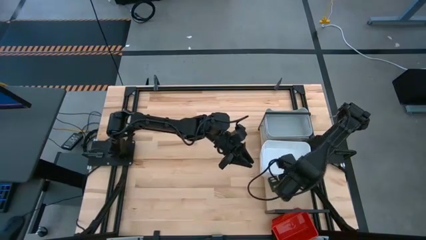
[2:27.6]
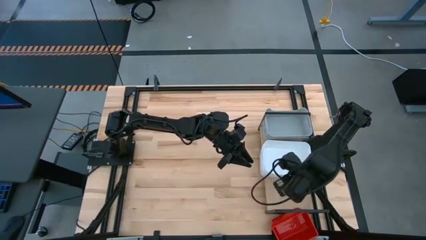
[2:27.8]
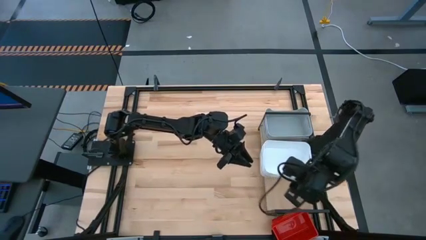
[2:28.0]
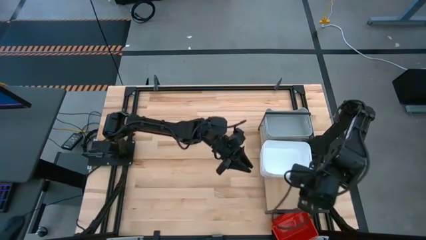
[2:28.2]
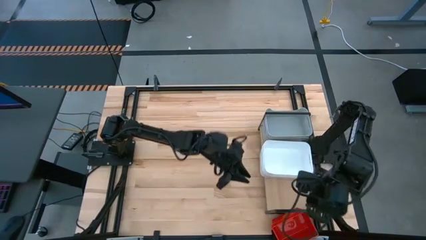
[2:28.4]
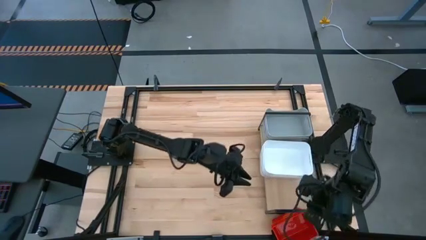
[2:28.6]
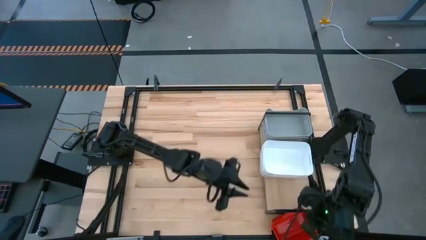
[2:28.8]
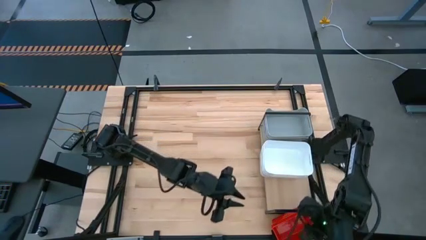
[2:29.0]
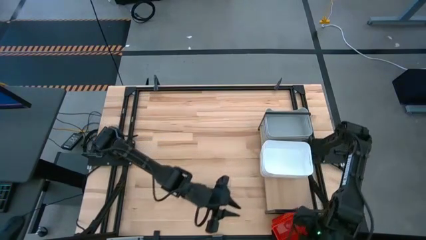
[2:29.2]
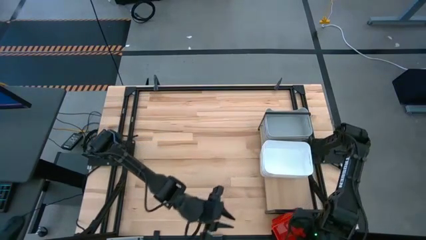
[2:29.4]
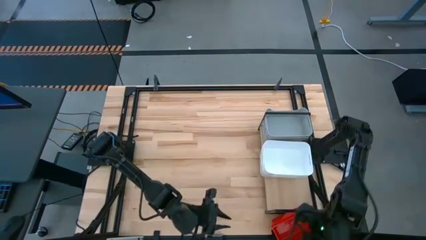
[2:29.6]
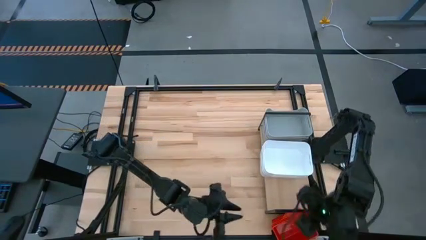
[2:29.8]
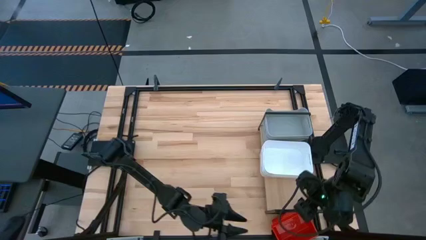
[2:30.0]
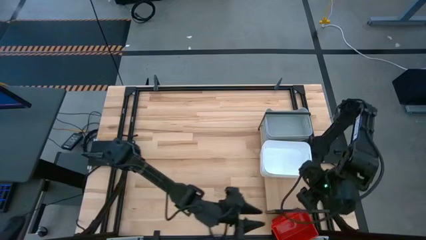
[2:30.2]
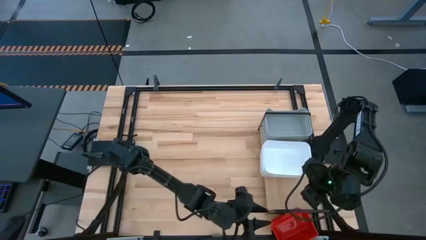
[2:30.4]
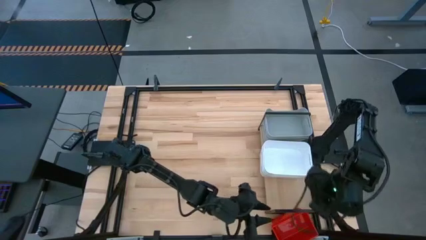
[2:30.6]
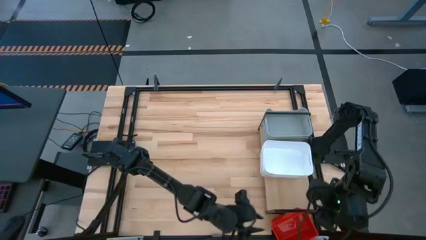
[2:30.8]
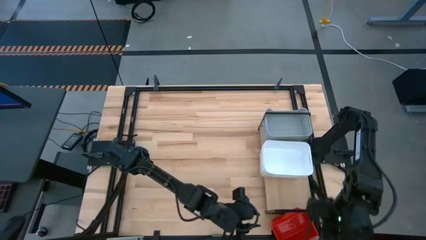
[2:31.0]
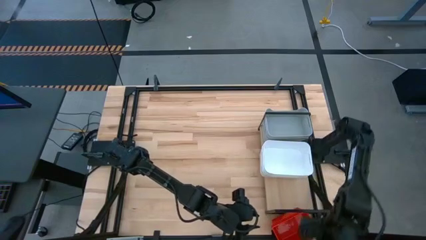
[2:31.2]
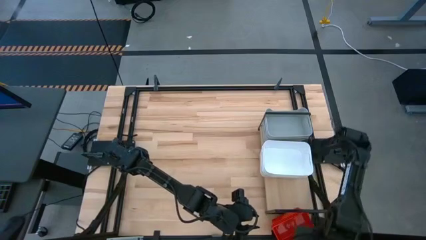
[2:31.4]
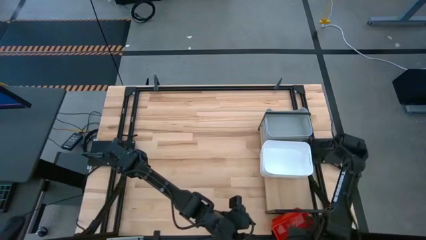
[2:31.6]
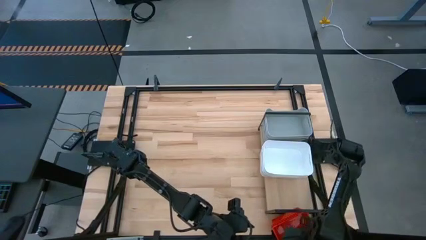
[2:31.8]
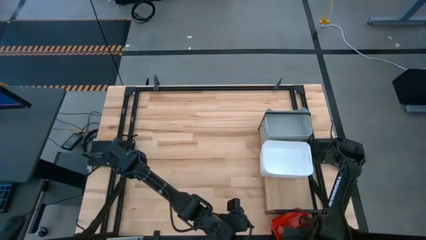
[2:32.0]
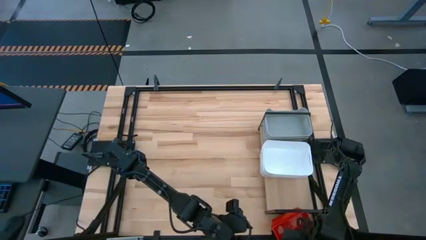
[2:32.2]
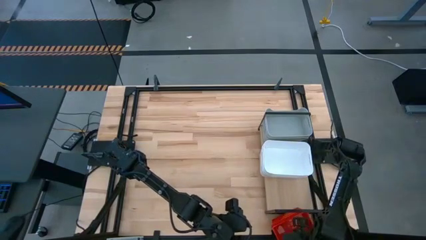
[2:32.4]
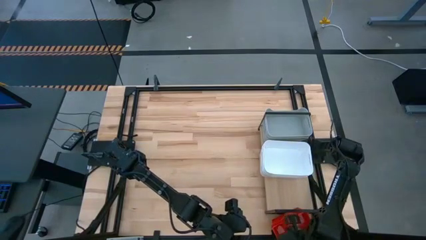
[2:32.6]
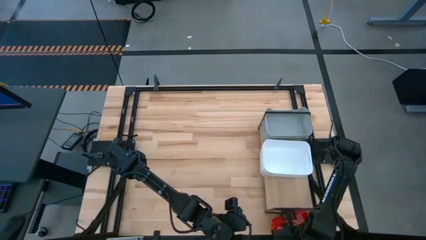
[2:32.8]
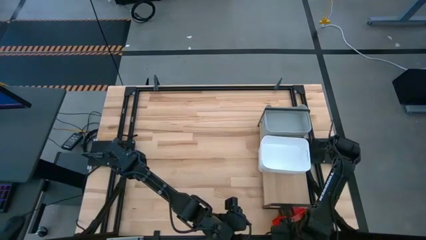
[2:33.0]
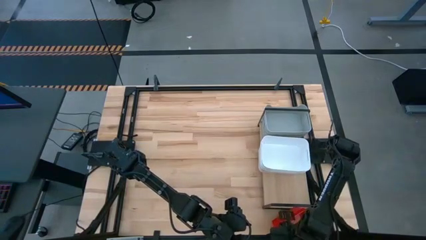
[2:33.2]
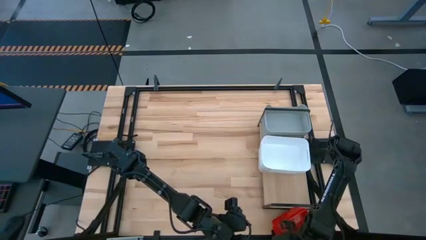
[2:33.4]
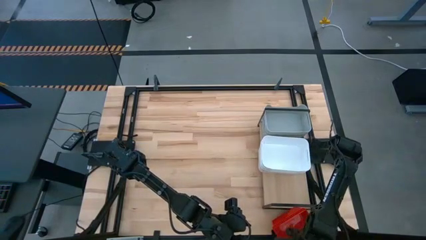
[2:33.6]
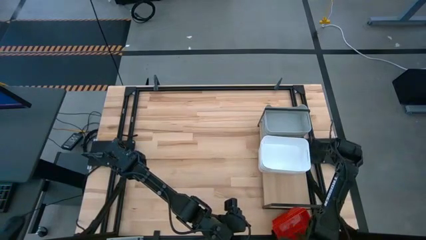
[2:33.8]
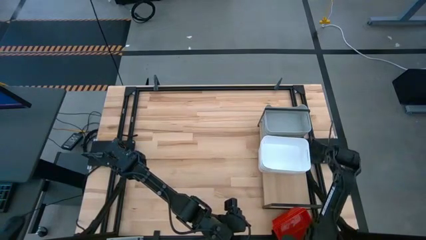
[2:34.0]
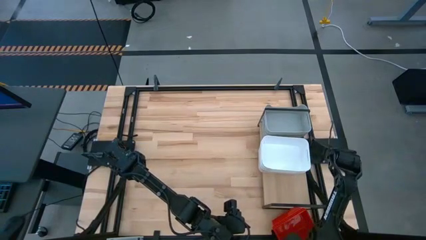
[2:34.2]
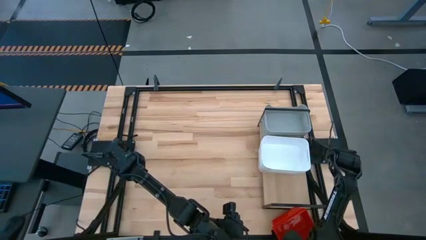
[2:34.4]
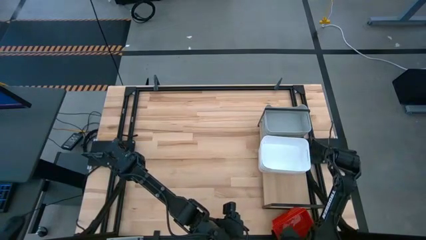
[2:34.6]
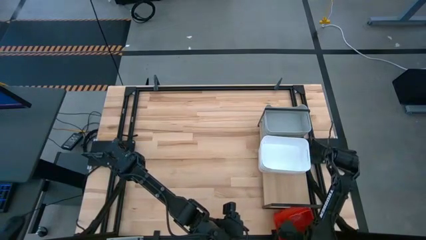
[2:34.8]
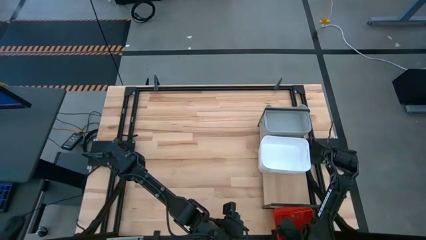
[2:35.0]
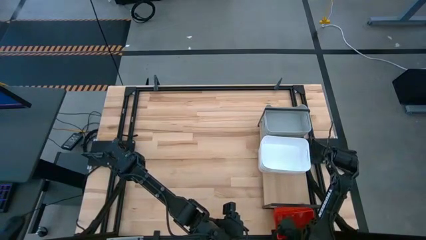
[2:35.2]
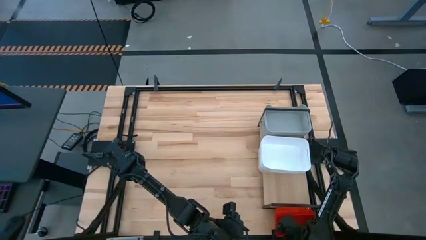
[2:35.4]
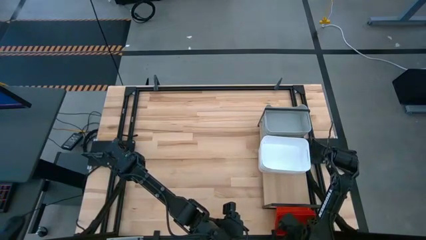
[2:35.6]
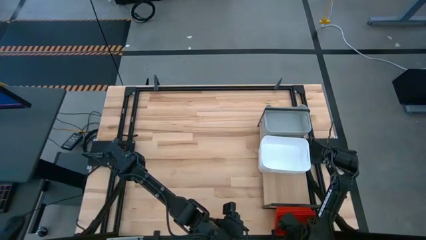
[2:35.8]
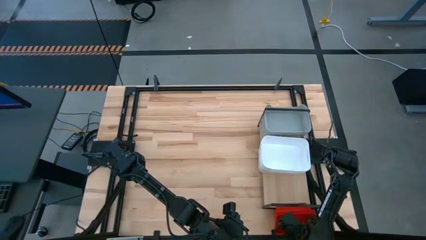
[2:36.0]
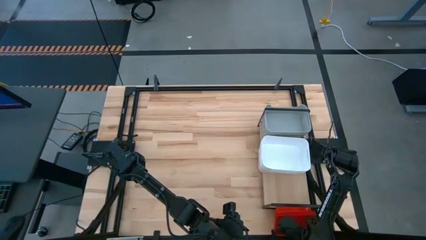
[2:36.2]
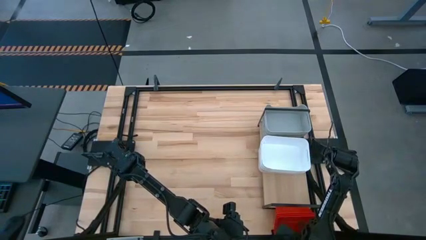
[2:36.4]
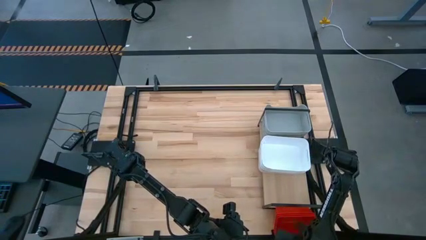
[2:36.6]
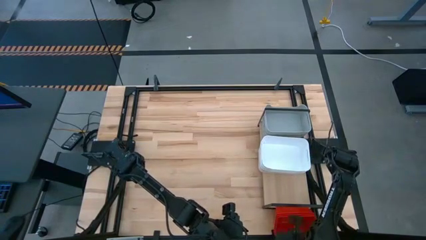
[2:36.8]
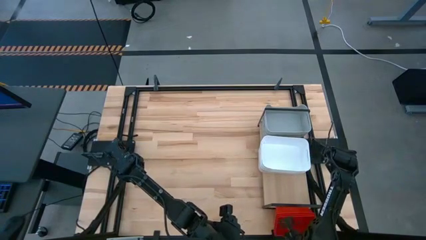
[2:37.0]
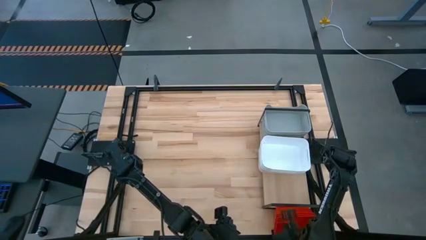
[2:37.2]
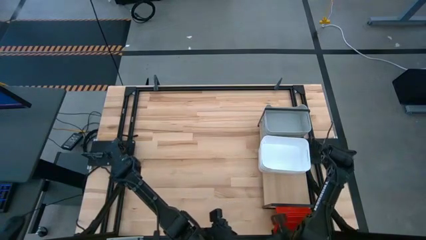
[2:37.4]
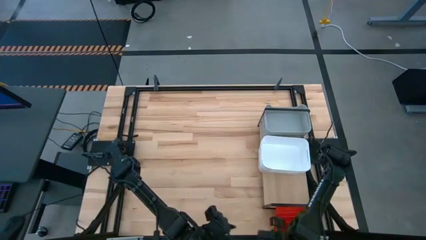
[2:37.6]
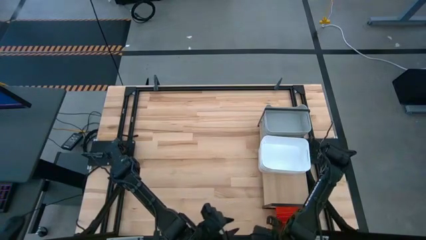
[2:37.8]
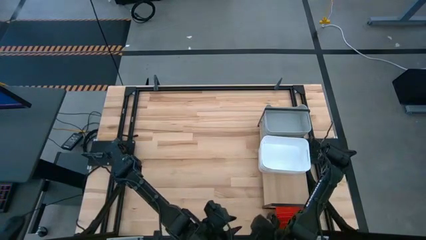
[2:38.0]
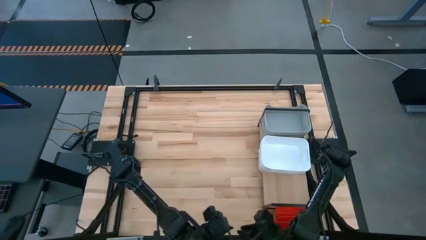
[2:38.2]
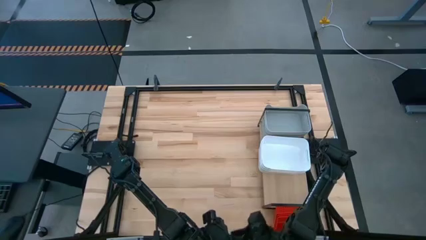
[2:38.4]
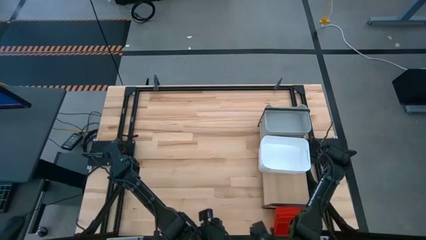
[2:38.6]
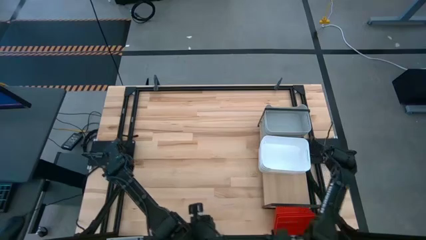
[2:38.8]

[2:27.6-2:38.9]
Task: Stack baskets on shelf by color
Adjust the stacked red bins on the shelf
